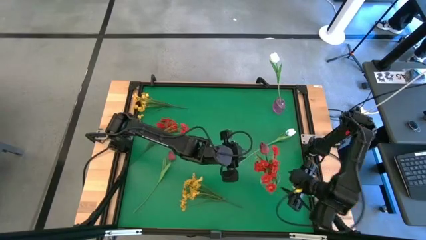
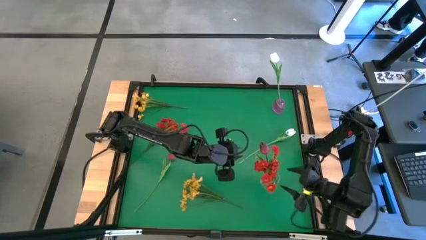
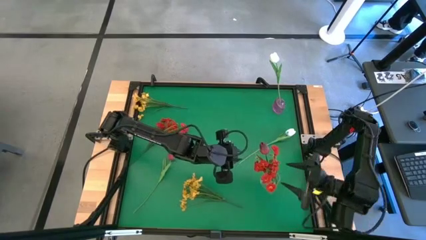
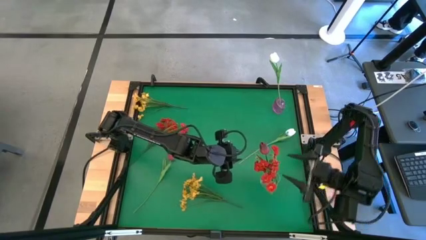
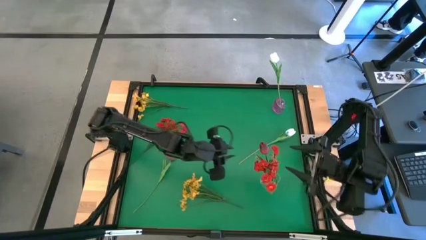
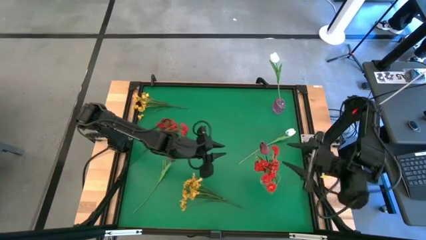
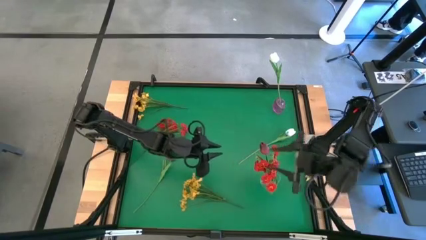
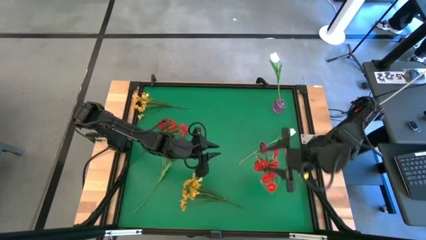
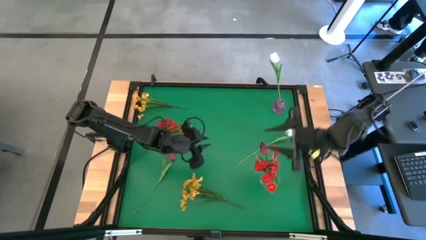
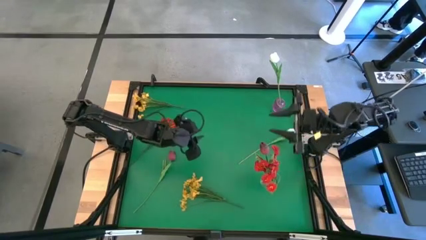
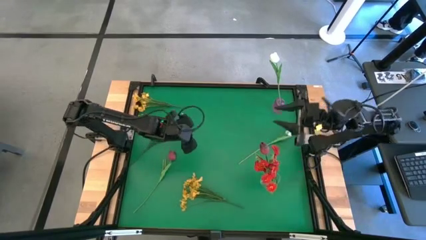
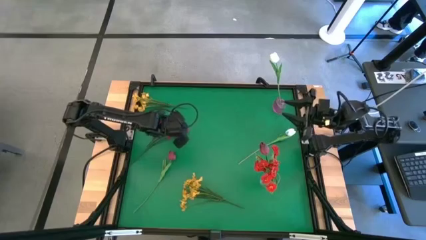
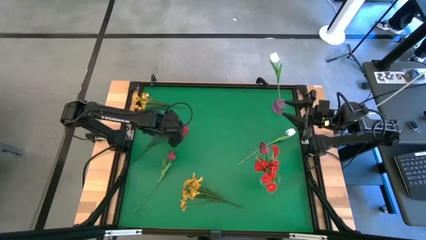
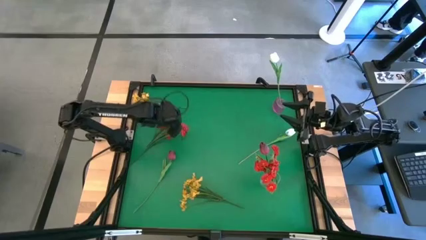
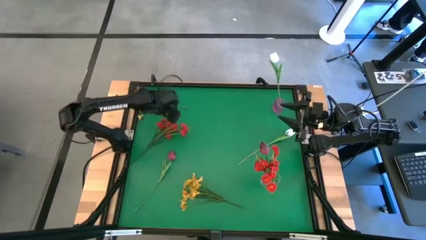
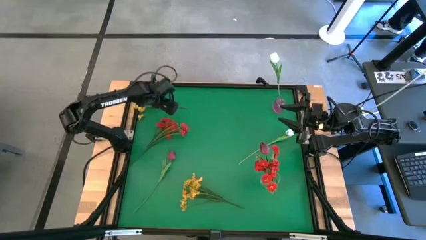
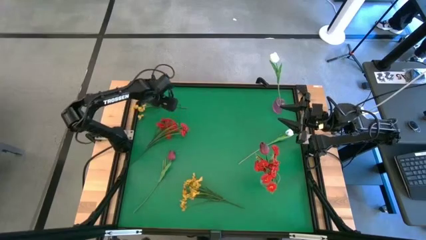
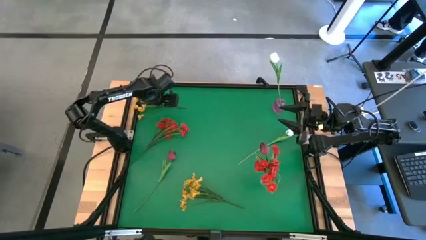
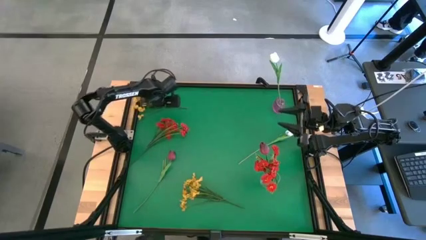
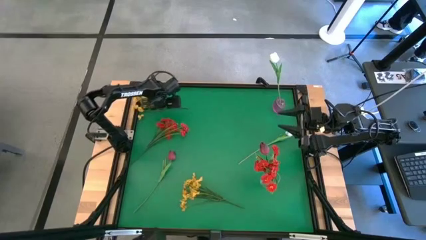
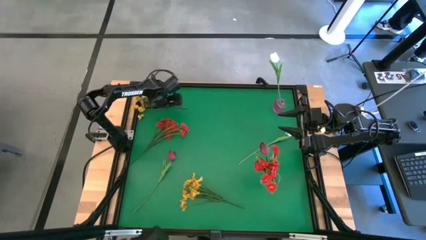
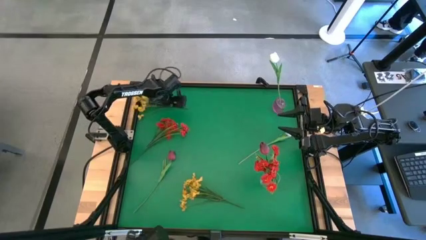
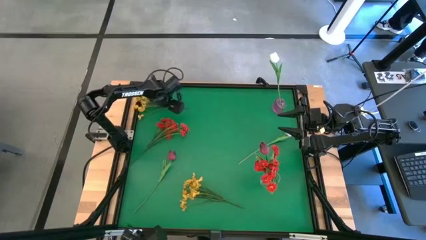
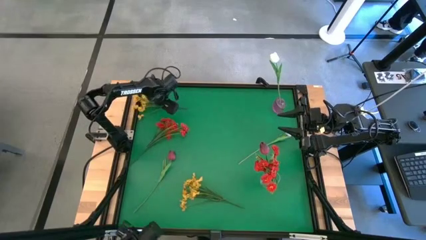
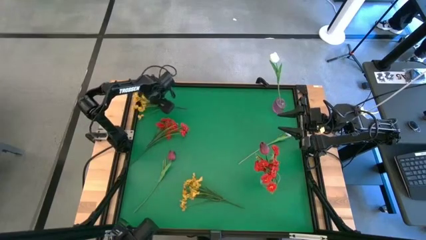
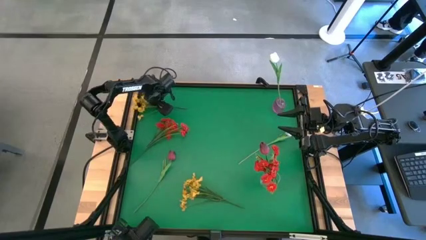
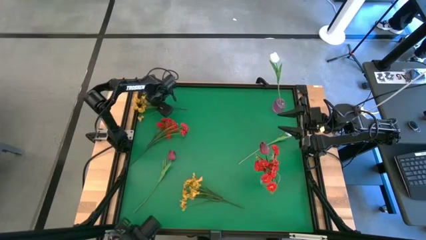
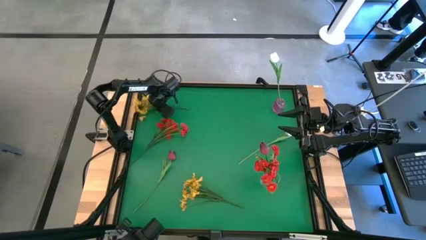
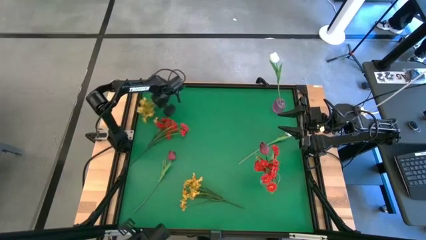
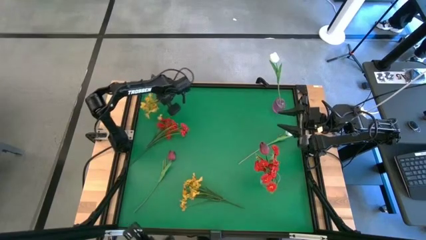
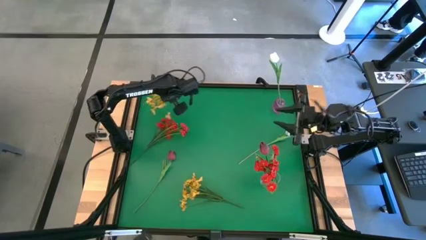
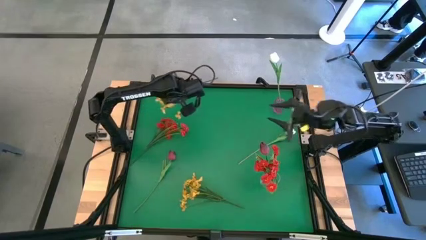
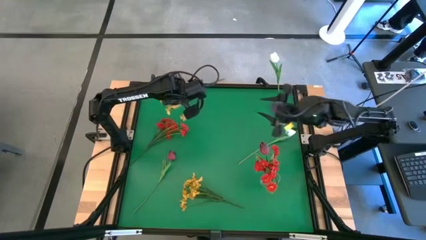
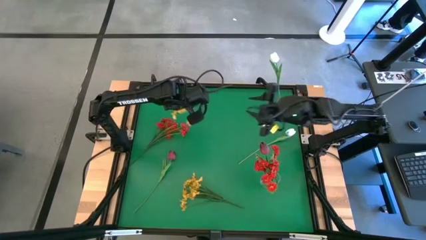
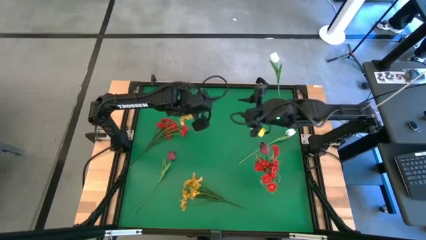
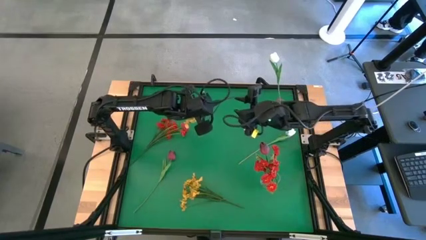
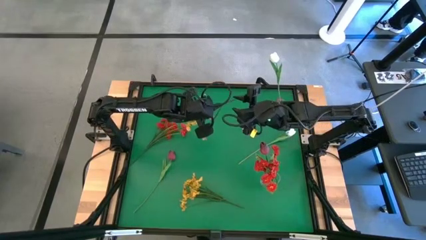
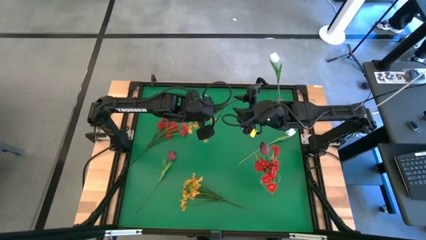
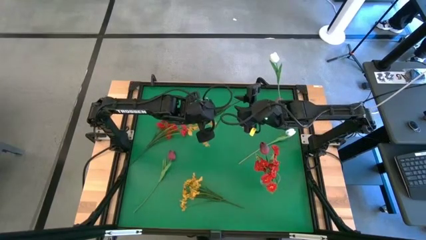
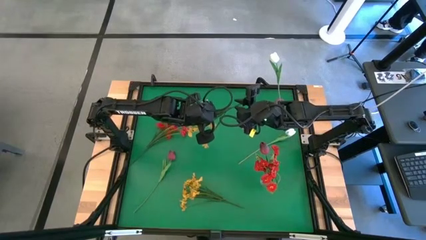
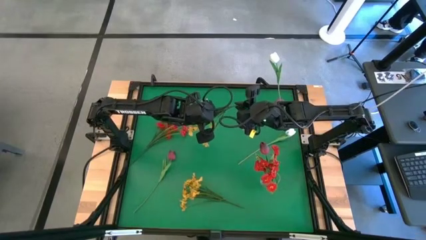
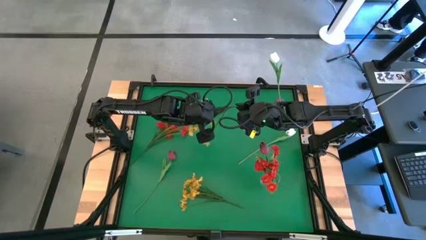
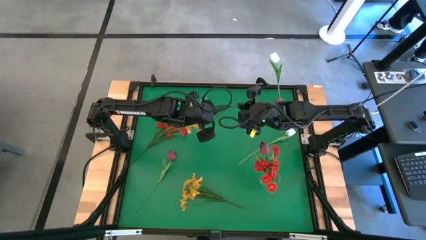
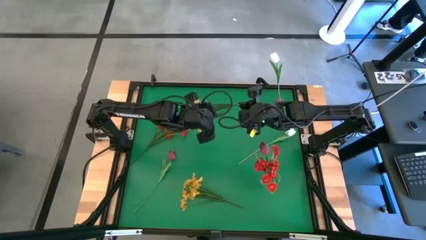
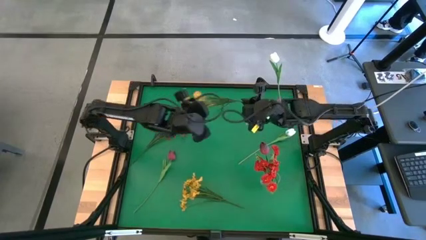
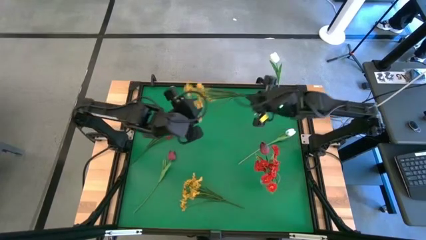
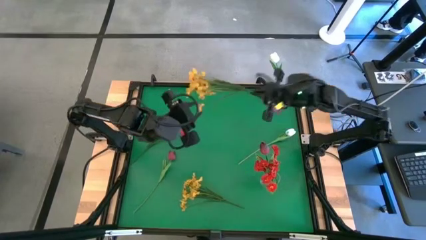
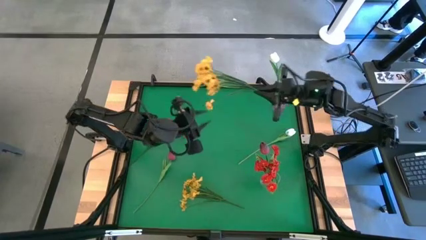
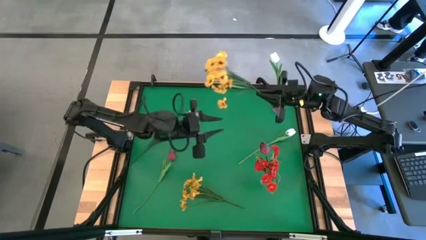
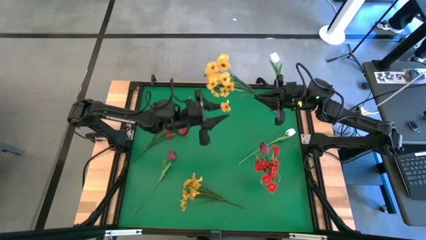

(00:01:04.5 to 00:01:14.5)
Task: Sort flowers into vase by color
Put the top yellow flowers into the purple vase

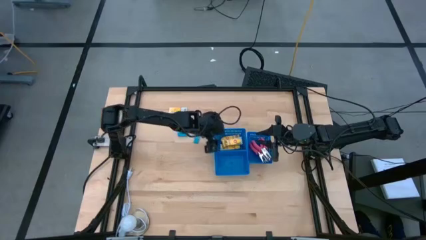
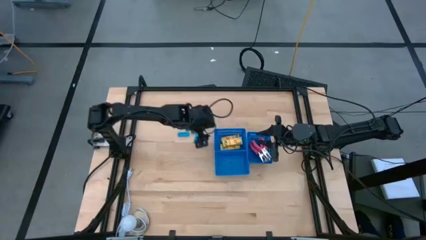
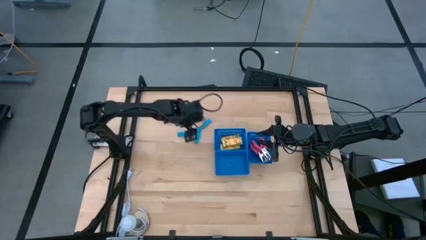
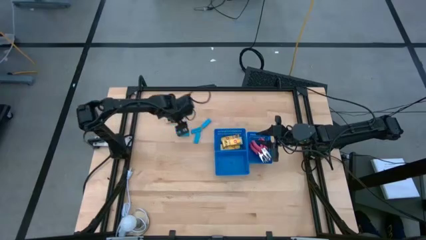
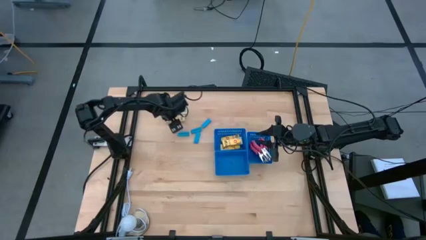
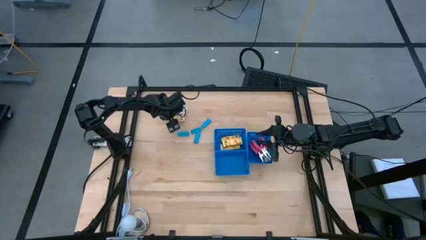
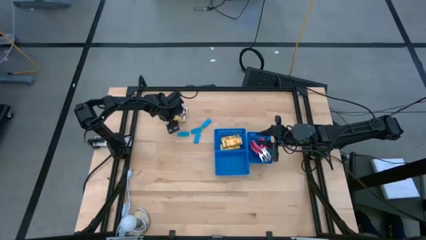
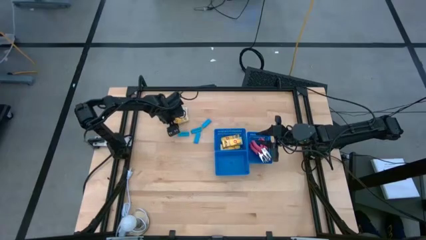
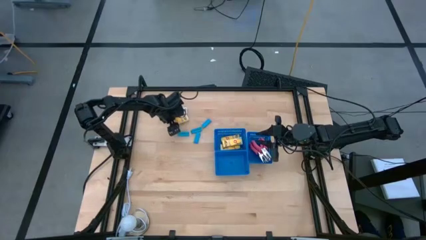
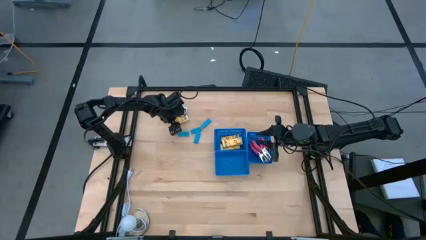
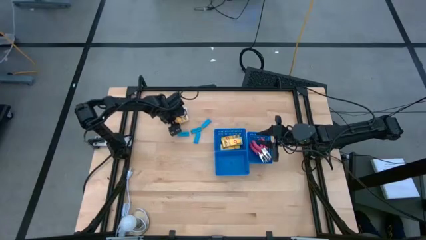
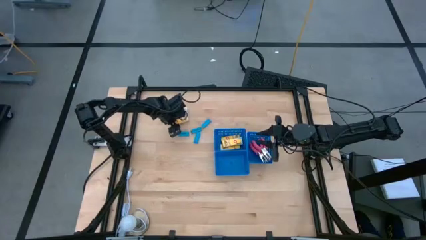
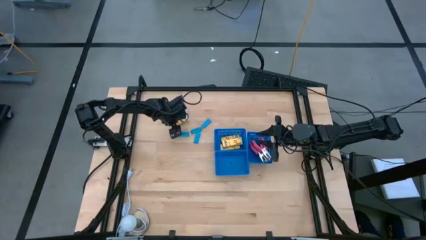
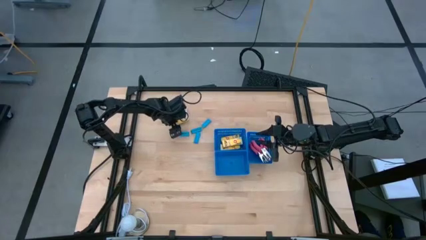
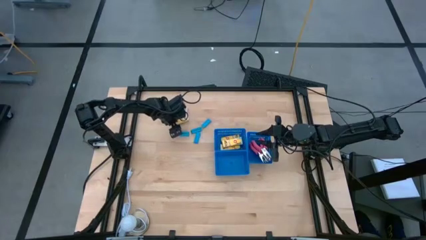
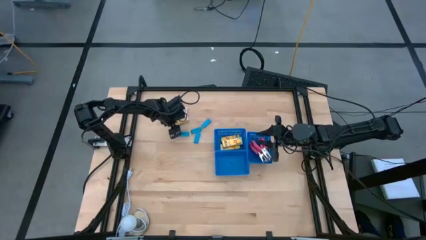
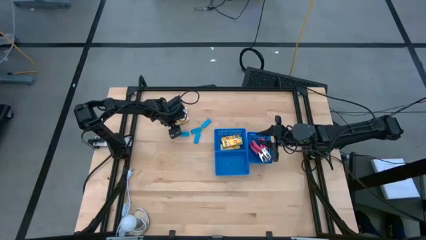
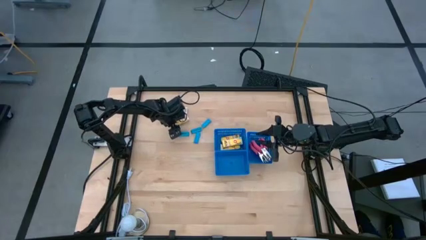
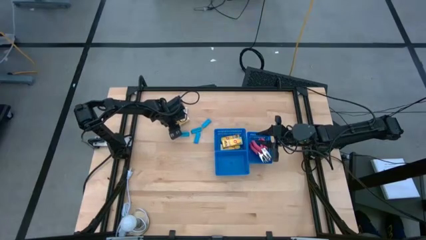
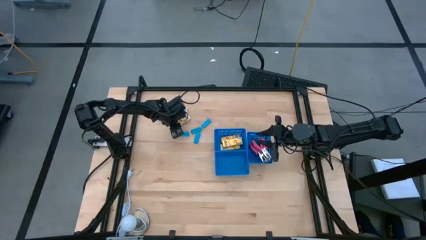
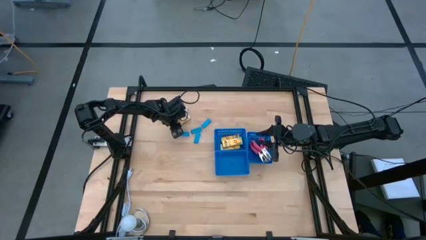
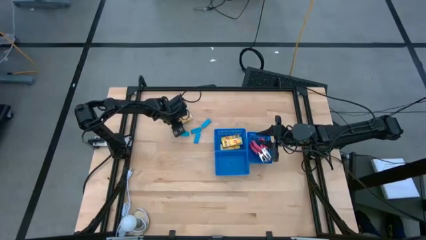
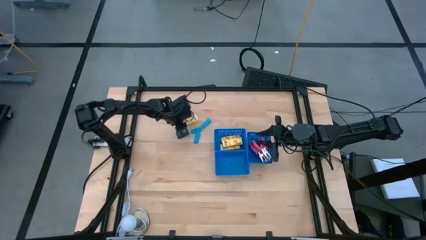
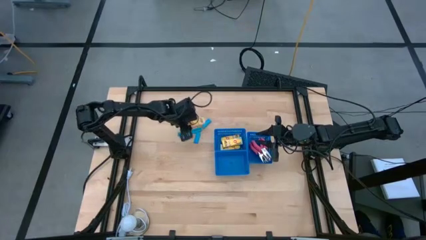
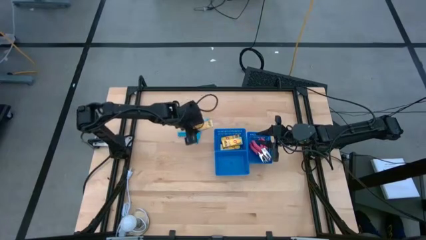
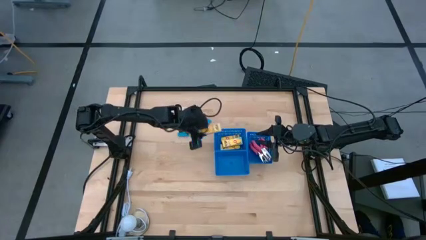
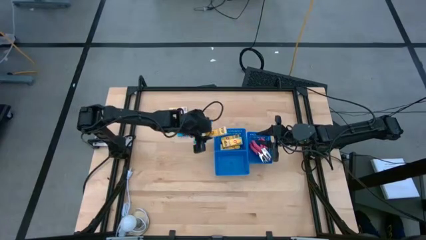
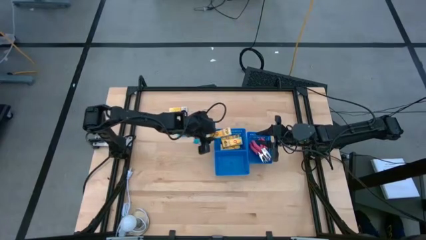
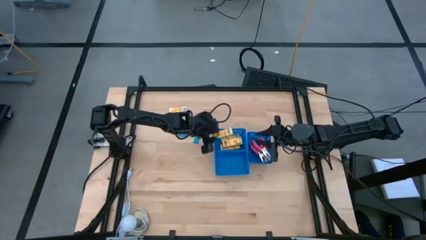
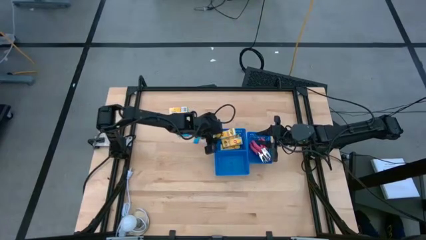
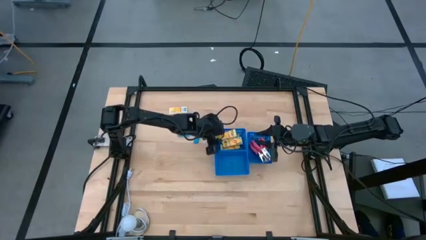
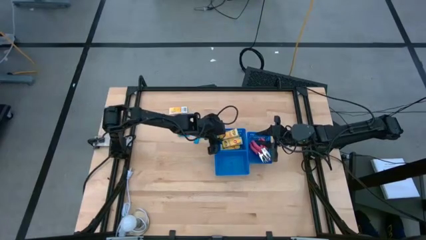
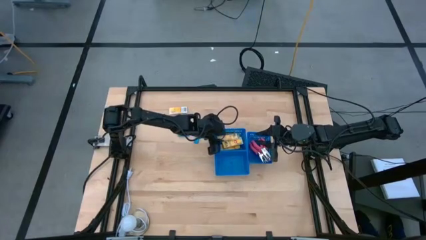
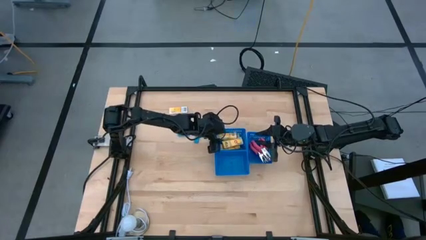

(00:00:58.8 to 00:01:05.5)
Task: Pick & Place School Supplies
Put the crayon box into the top horizontal blue bin
